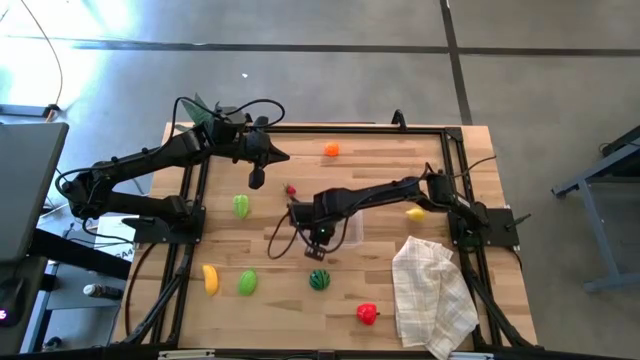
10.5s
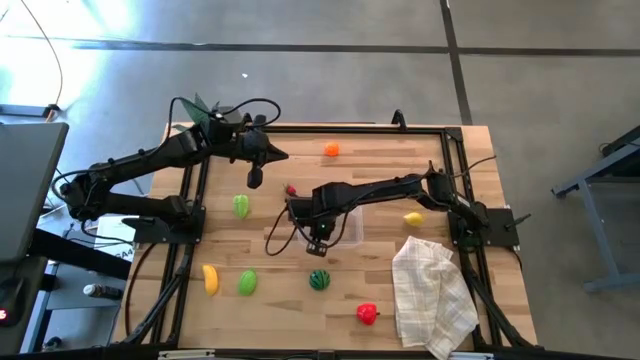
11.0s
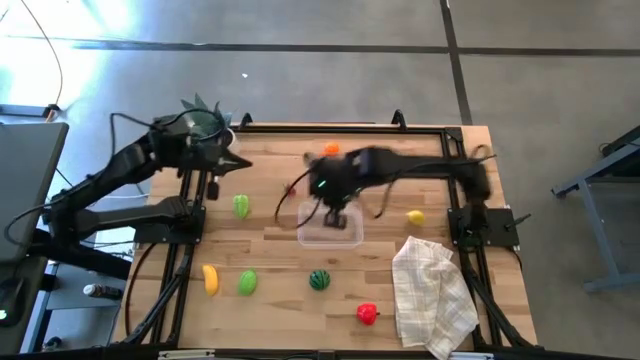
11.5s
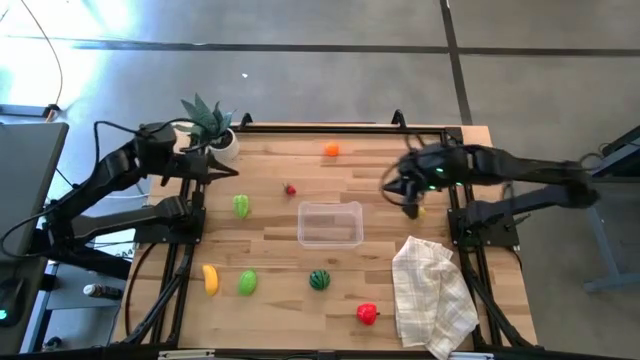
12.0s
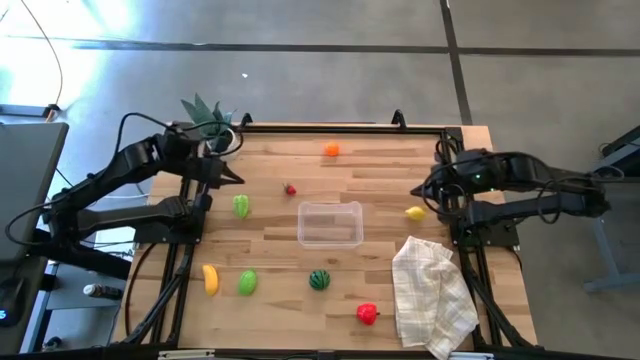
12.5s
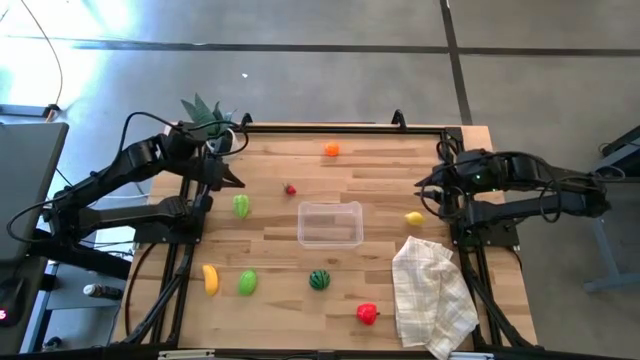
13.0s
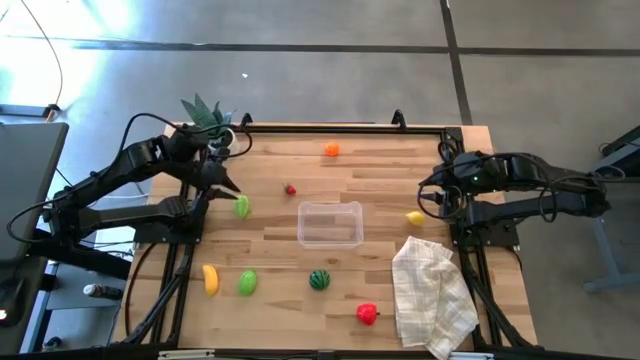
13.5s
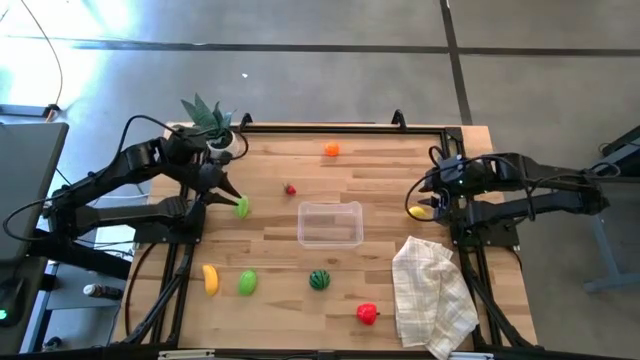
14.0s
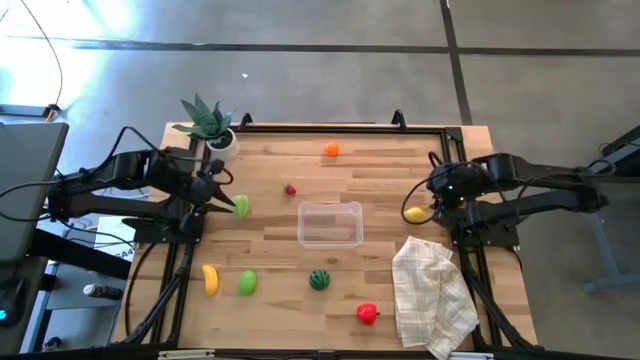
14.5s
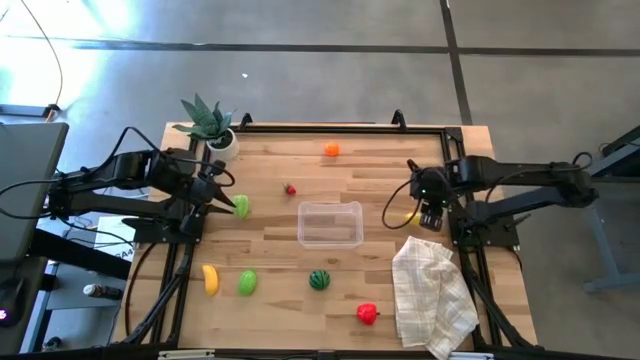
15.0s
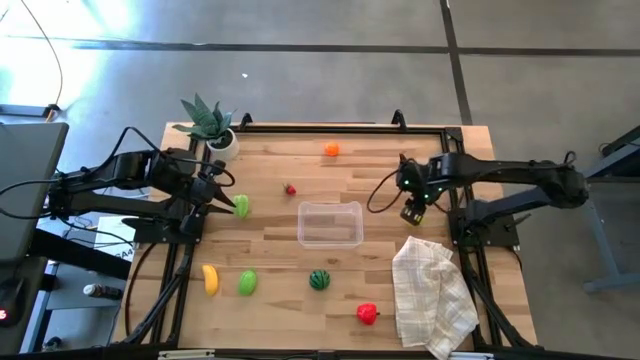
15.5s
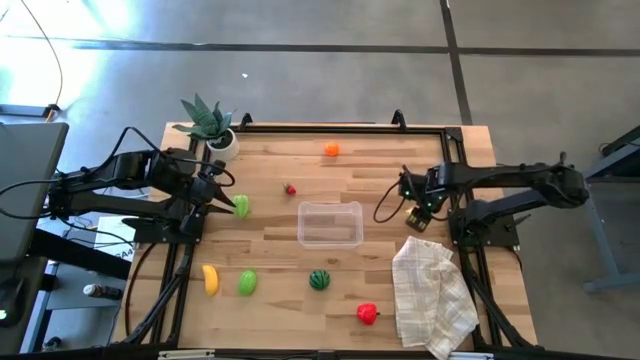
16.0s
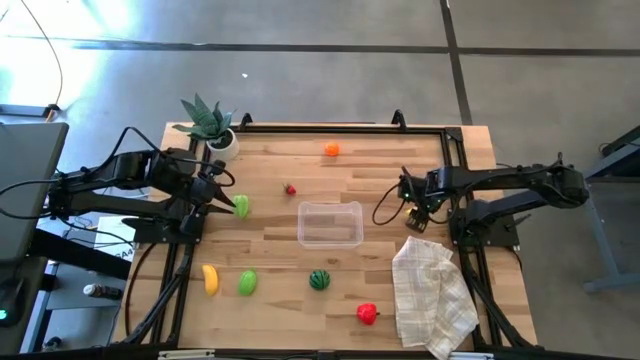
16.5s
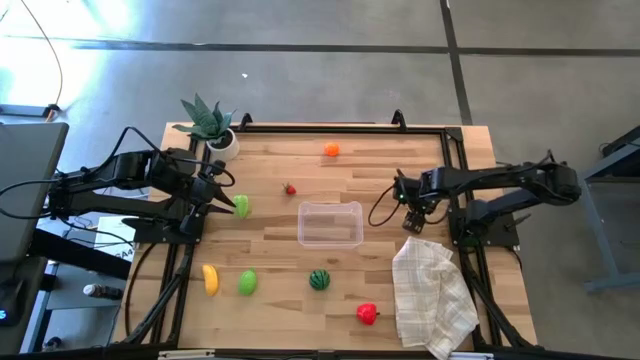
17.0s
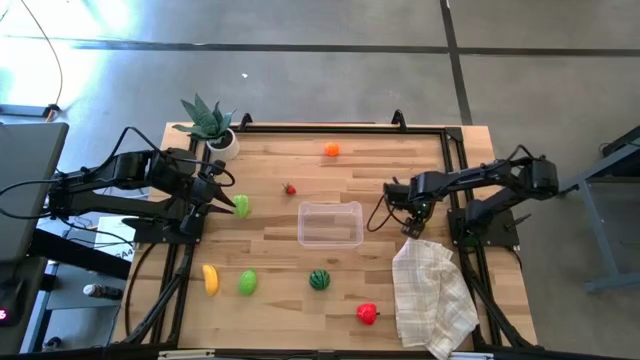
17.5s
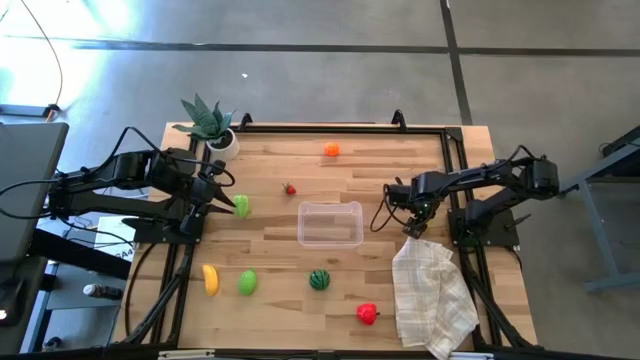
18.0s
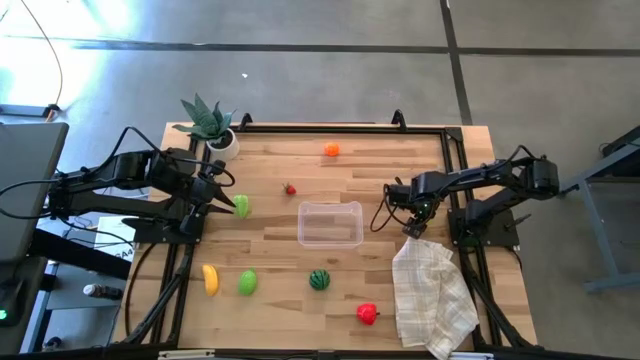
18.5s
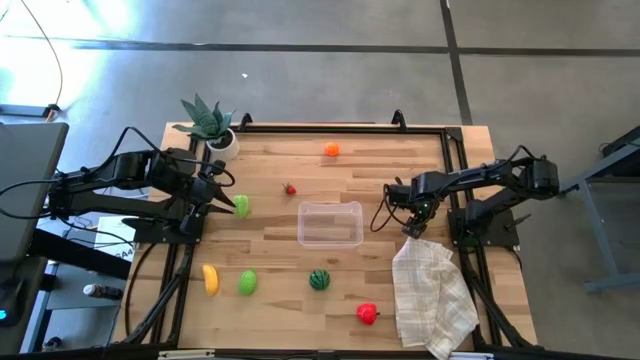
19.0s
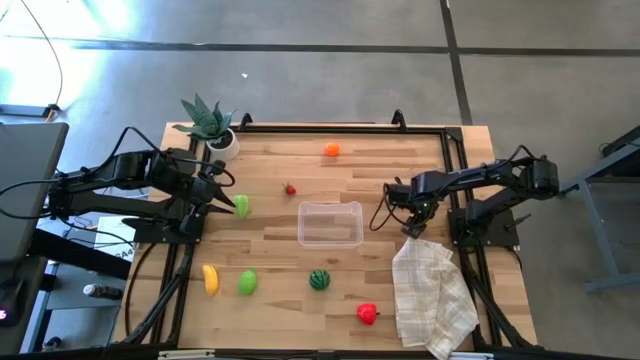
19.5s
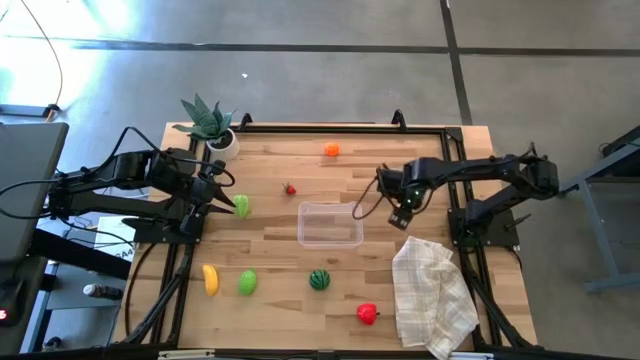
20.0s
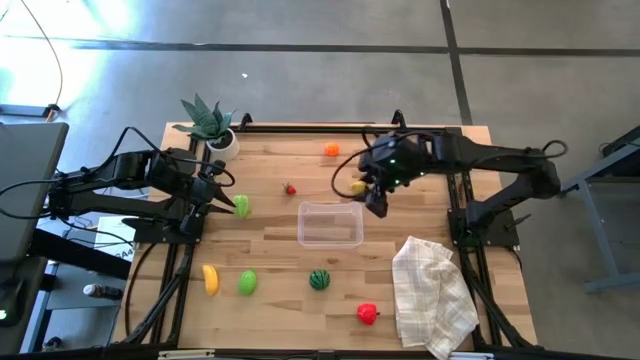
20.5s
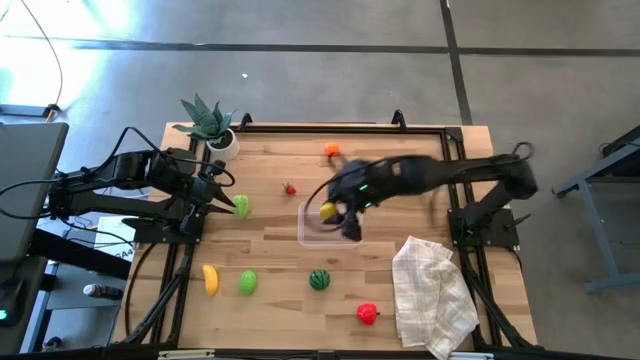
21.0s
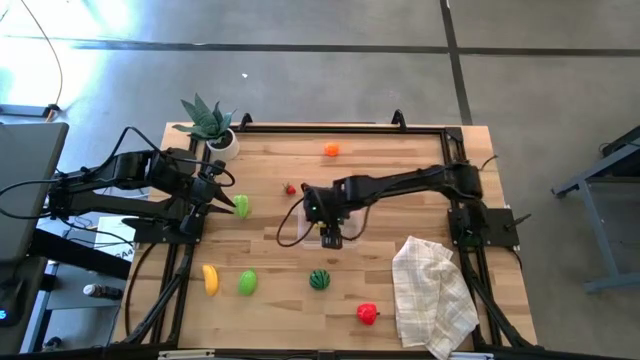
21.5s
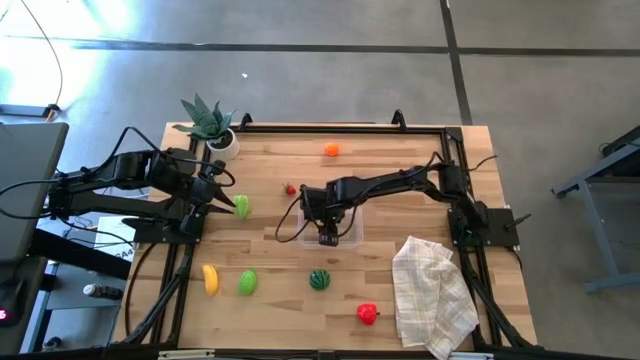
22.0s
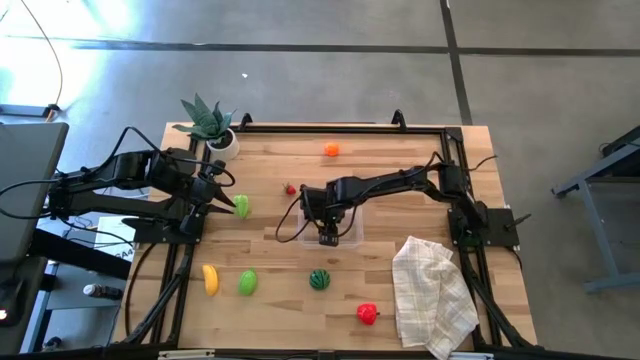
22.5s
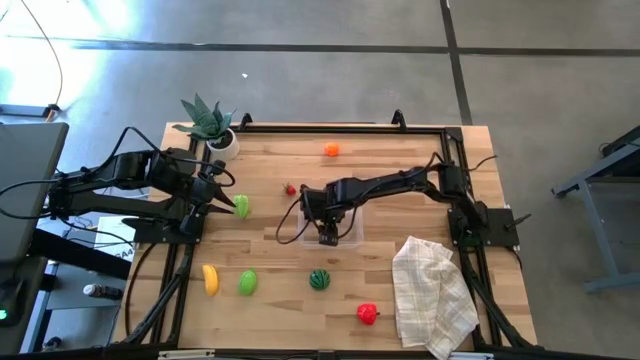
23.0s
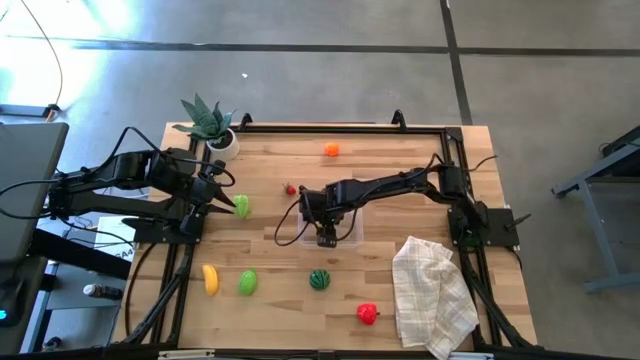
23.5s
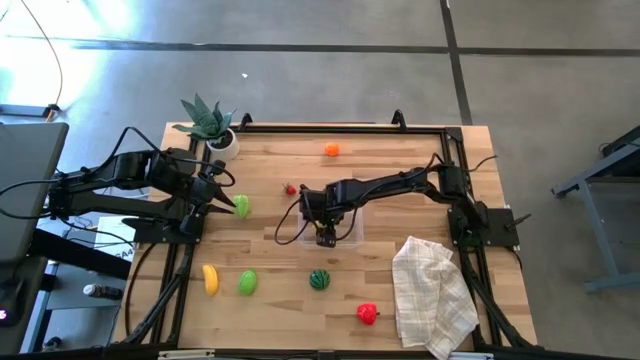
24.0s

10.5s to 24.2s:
Task: Pick and placing Produce into tupperware
Put the yellow lemon into the transparent bin

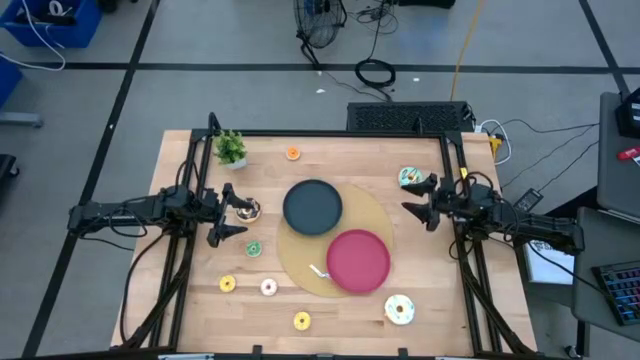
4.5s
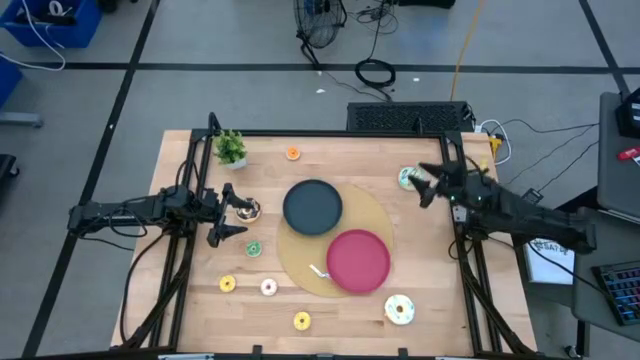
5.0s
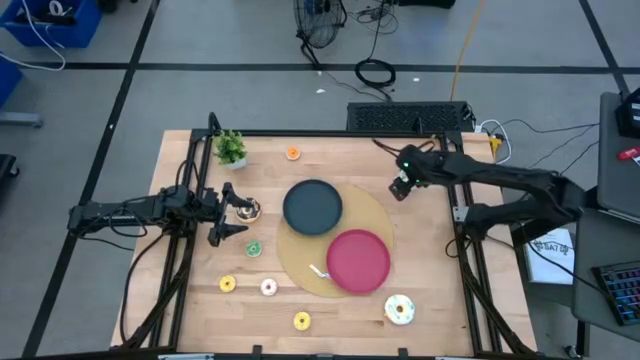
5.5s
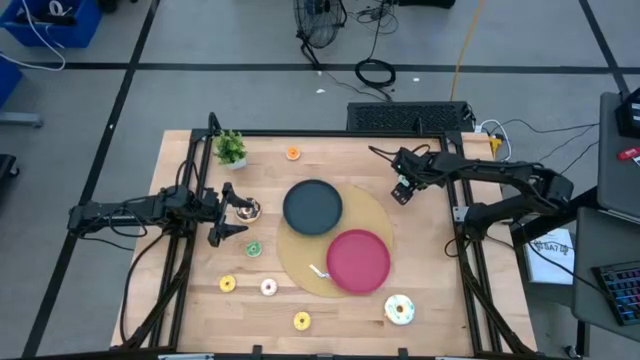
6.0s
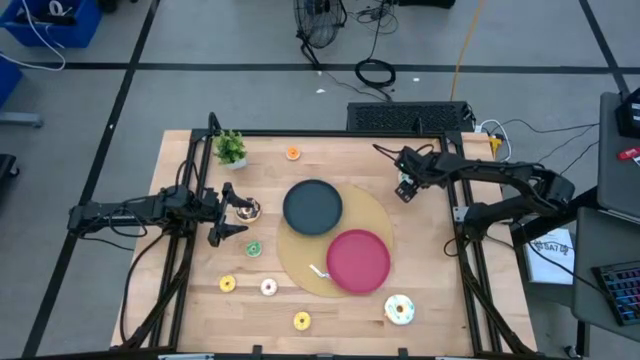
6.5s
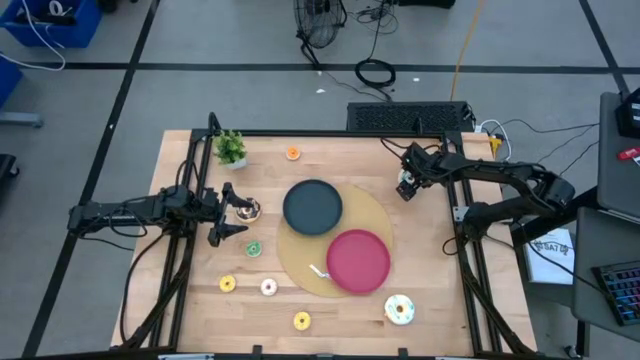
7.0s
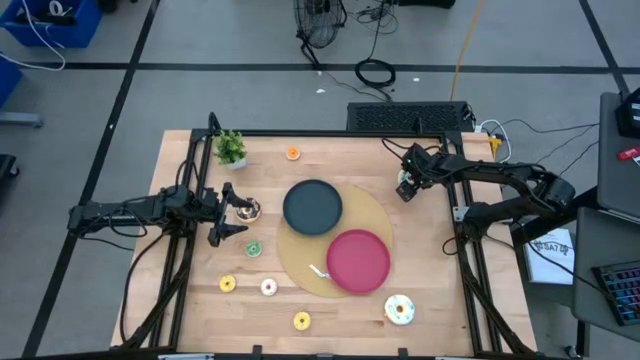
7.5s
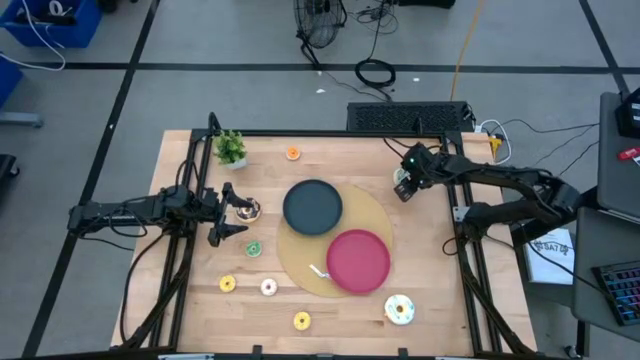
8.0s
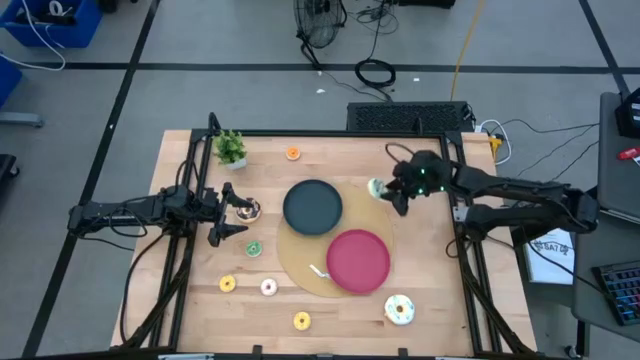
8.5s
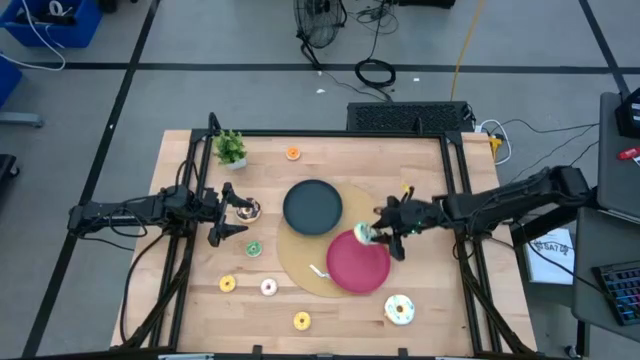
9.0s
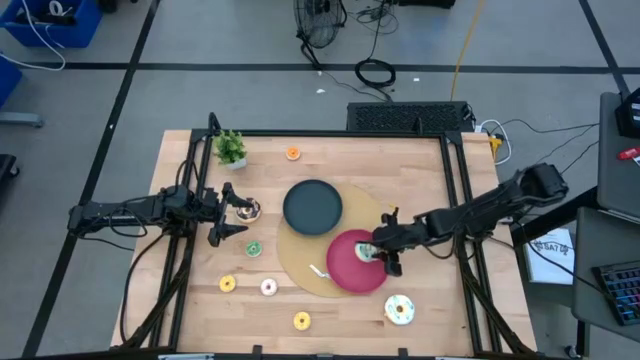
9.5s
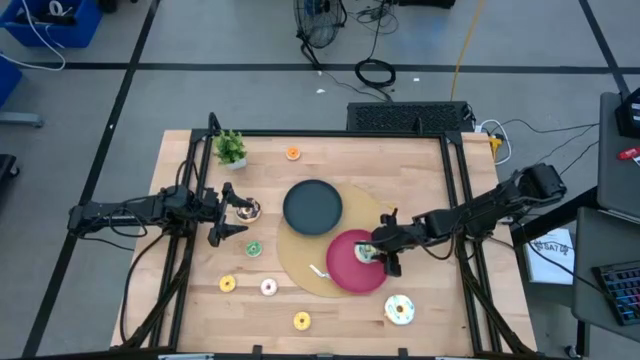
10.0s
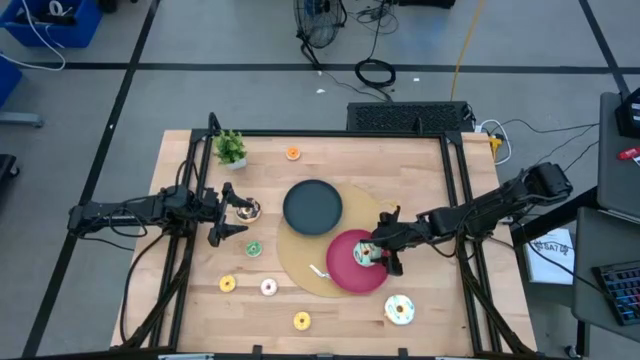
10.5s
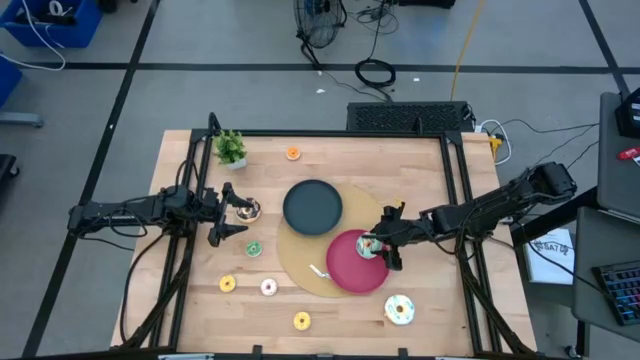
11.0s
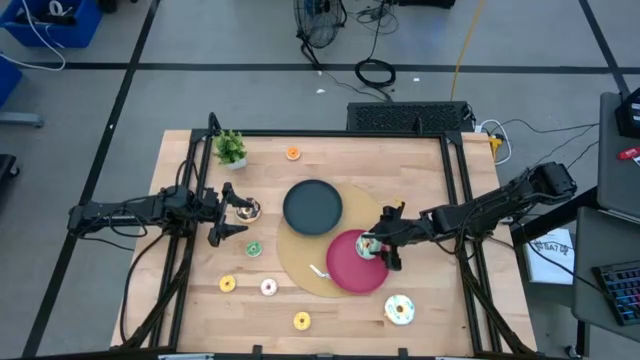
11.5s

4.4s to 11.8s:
Task: Pick & Place donuts
Put the large blue doughnut on the pink plate
